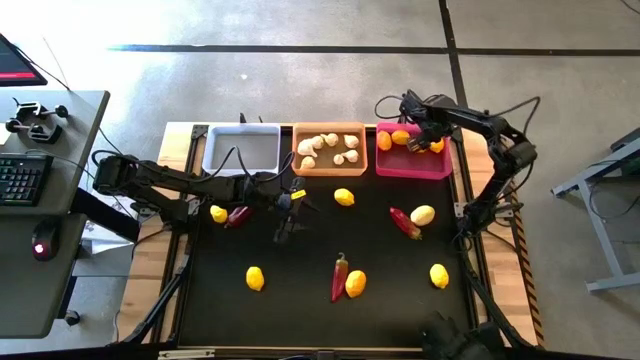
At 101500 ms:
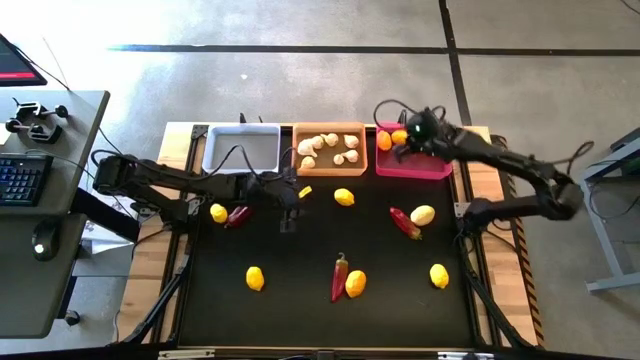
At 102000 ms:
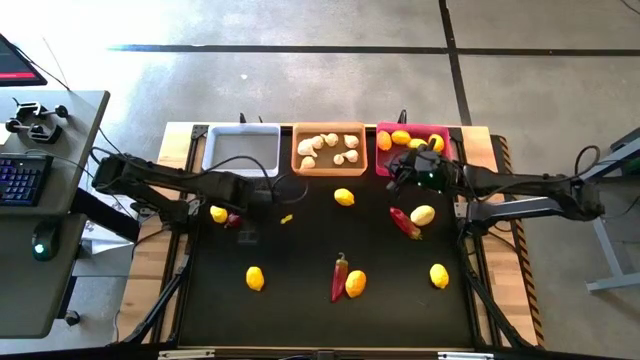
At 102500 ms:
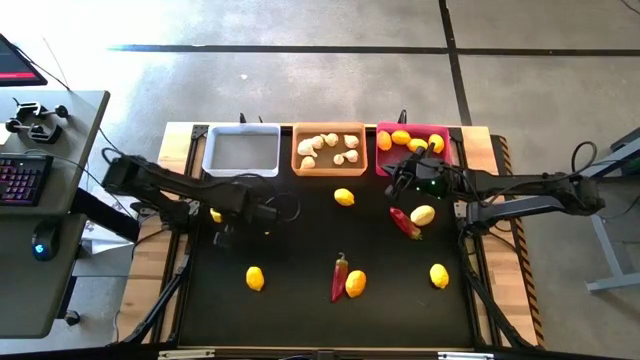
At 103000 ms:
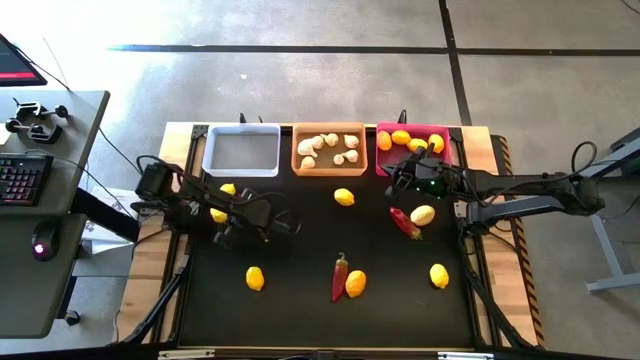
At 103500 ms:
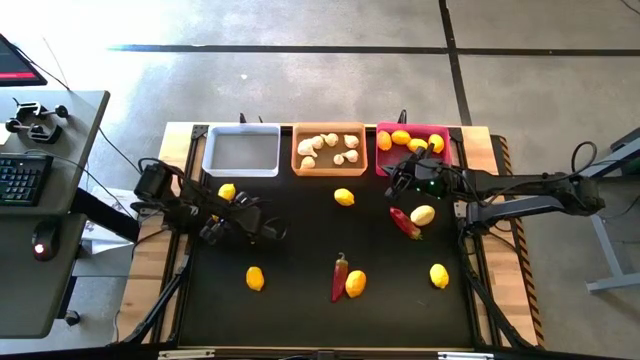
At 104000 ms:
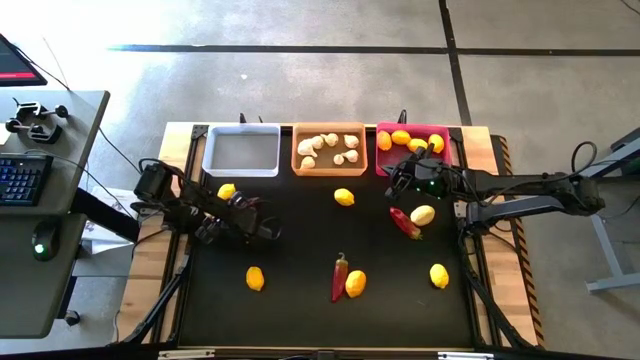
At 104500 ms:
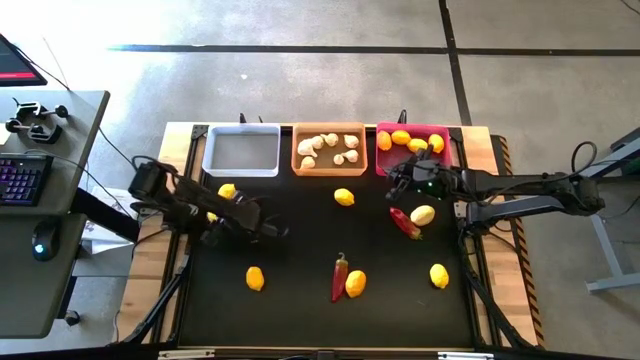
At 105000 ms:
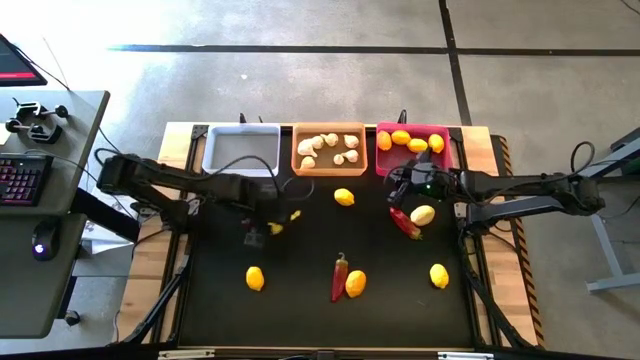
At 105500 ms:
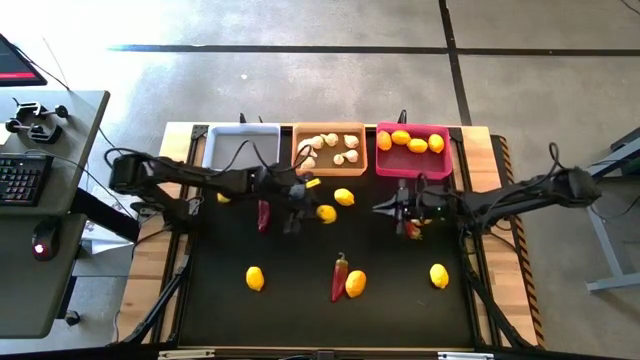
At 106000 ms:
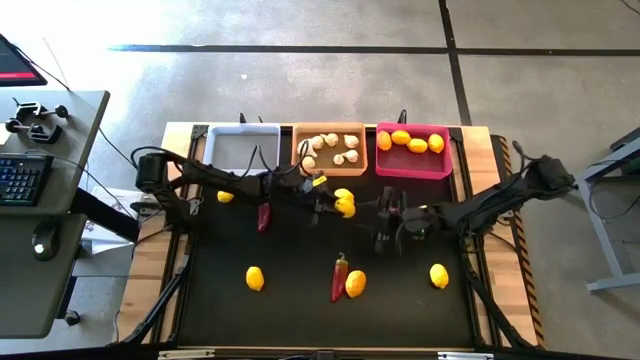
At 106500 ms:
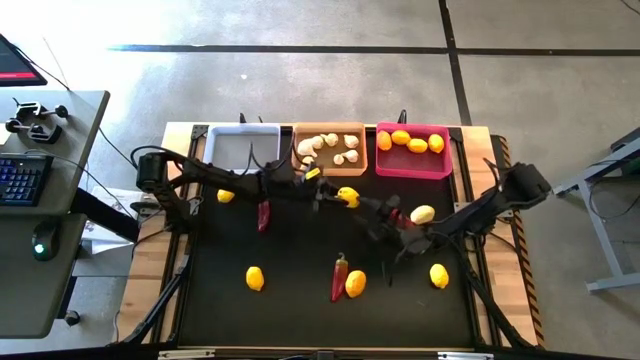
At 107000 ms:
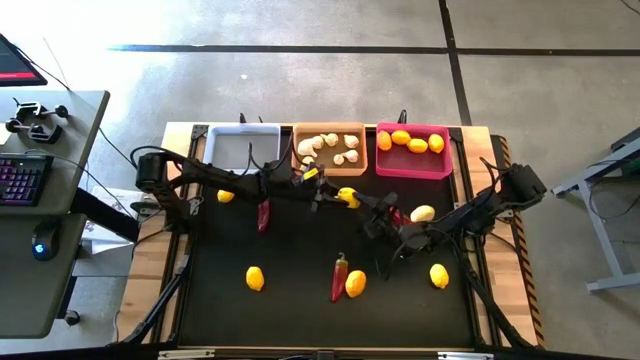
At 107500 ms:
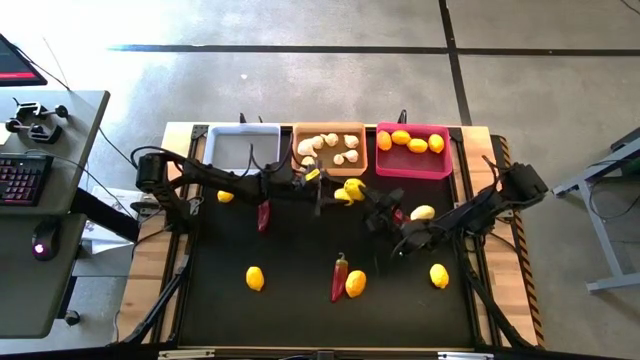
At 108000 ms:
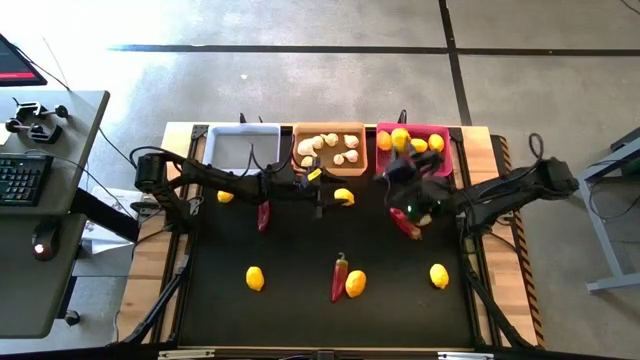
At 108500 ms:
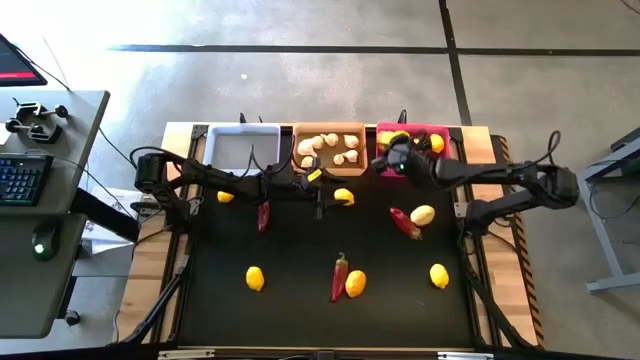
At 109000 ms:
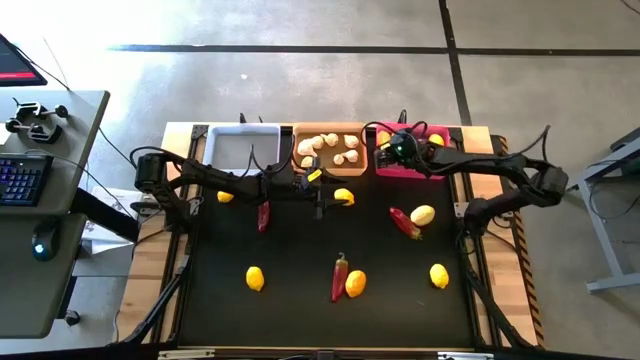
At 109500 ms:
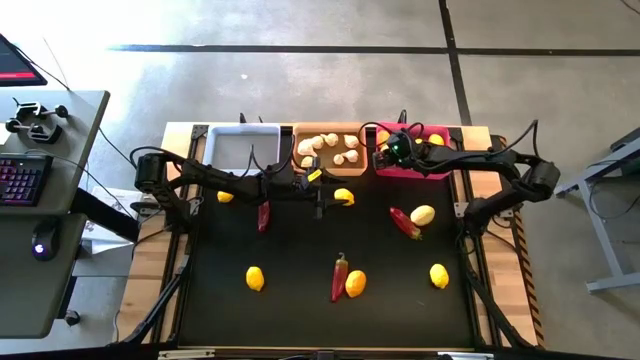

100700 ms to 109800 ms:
Task: Sort produce into baskets
Put the orange lemon into the pink bin

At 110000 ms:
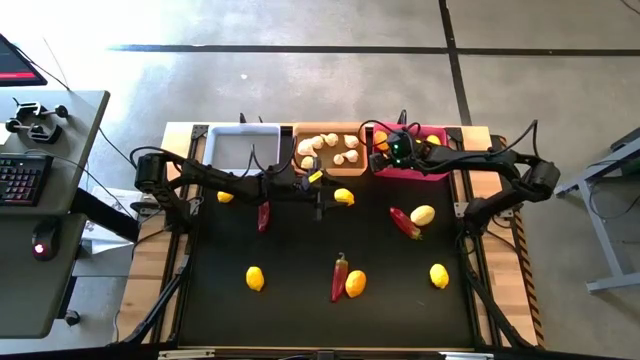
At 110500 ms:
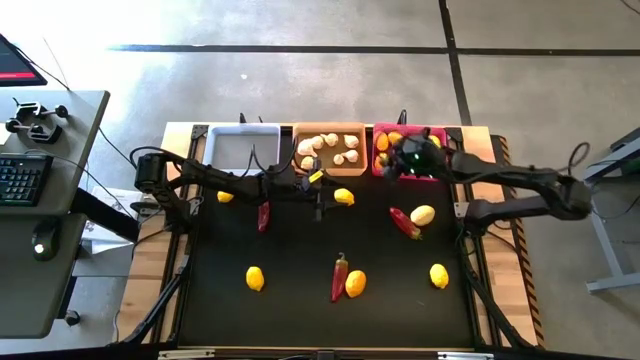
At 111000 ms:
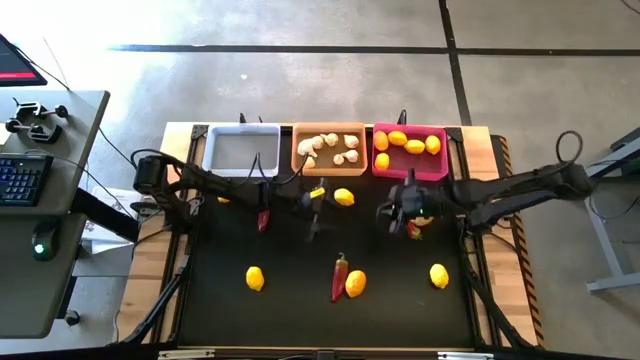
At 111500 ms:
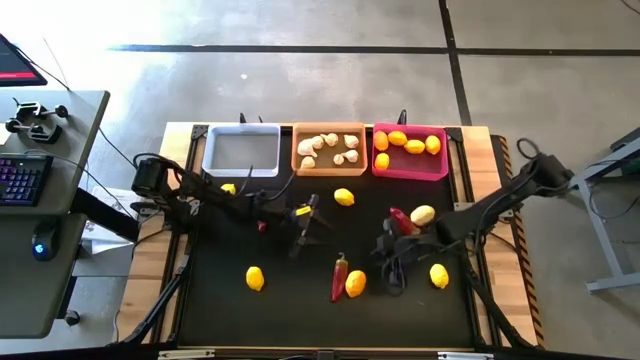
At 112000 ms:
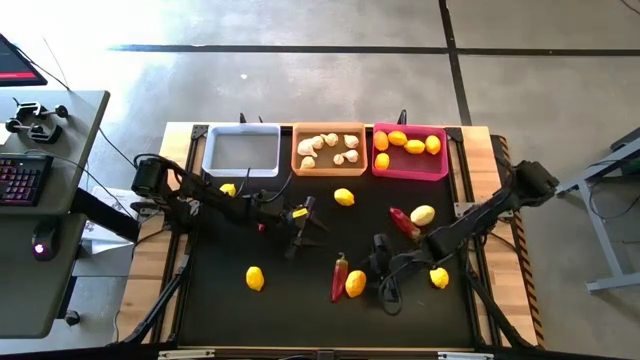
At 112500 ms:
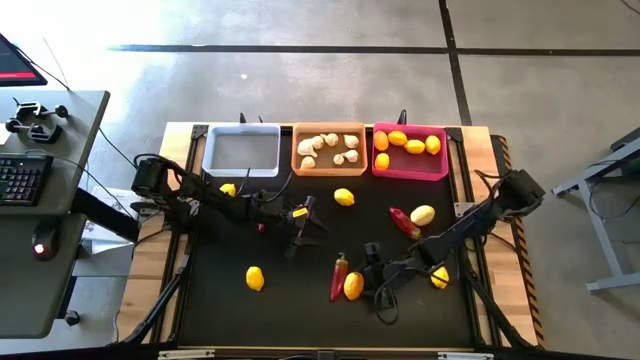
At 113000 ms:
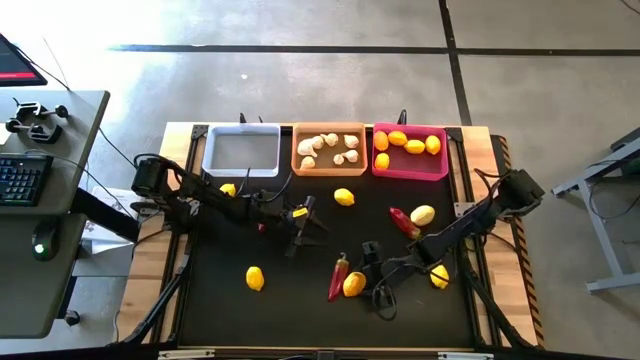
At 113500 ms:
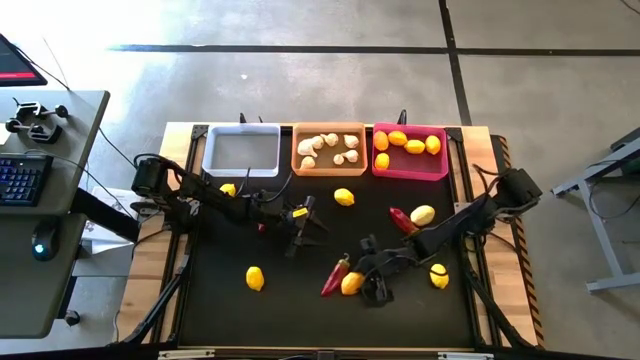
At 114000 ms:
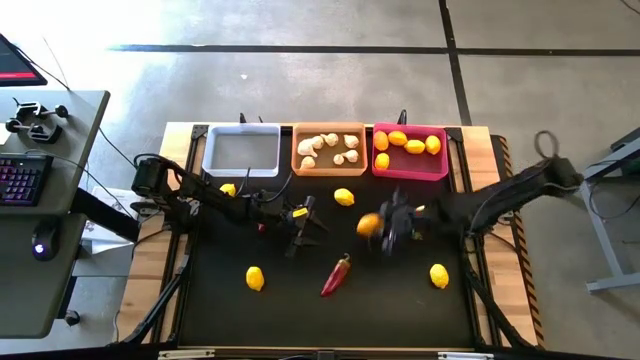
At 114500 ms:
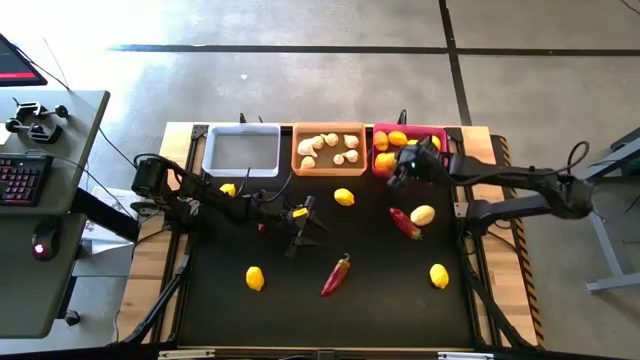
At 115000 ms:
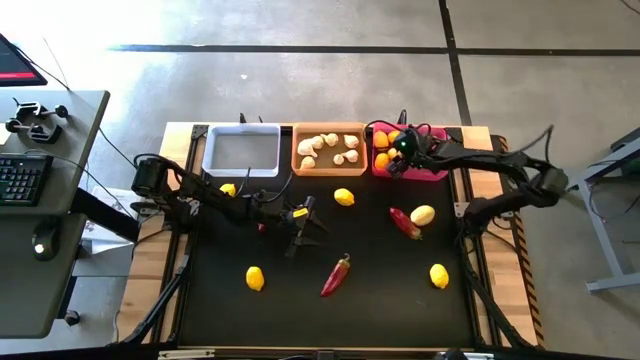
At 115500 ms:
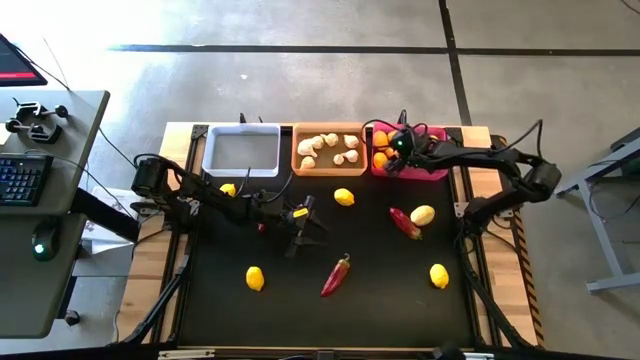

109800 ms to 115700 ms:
Put the yellow lemon into the pink bin

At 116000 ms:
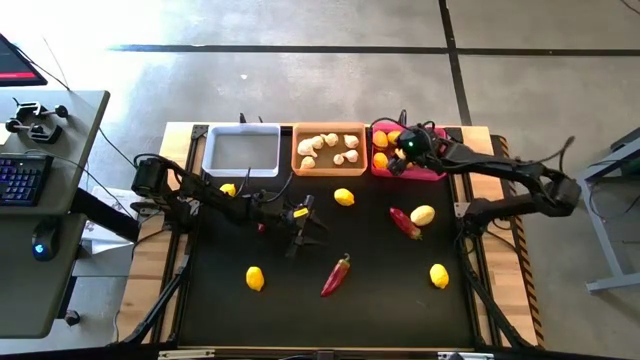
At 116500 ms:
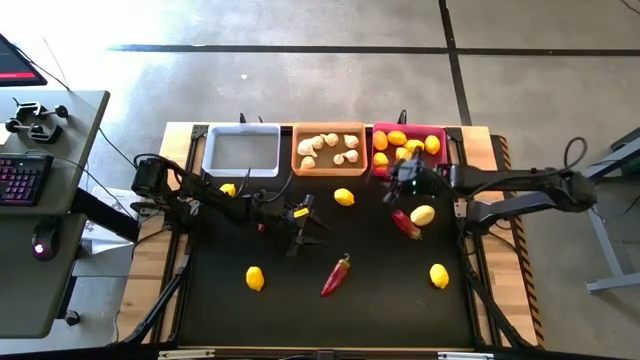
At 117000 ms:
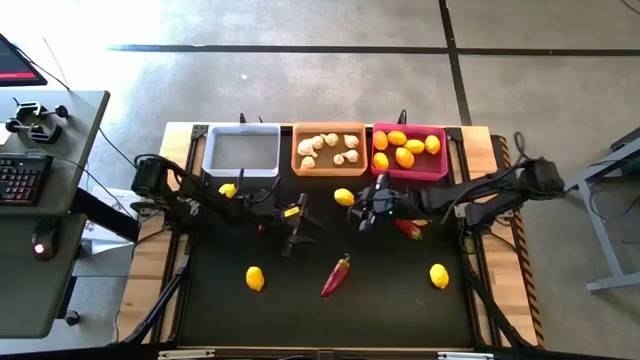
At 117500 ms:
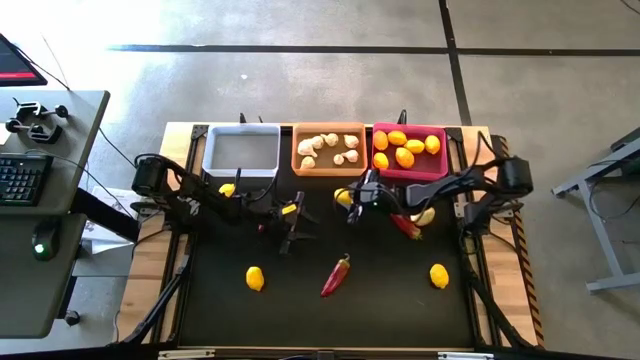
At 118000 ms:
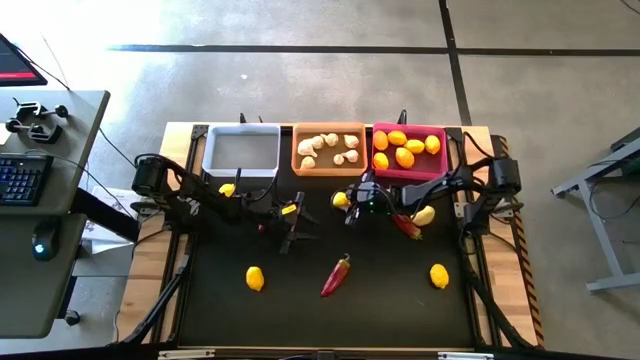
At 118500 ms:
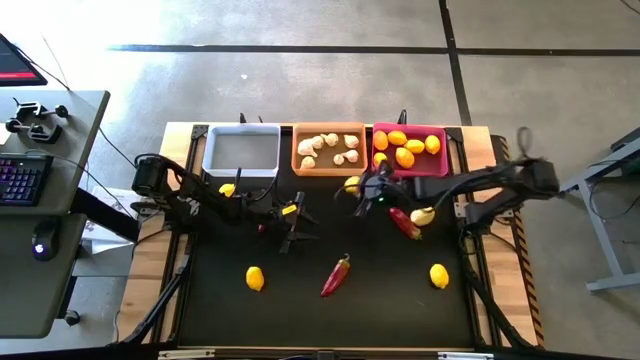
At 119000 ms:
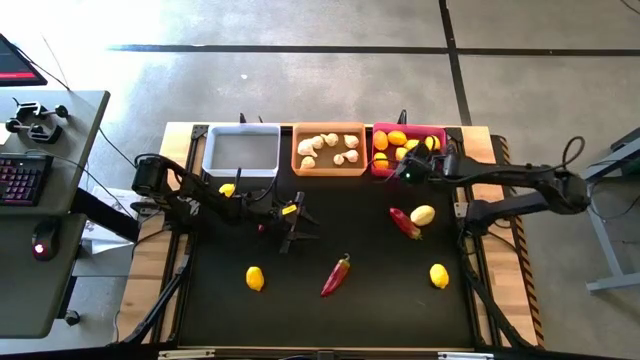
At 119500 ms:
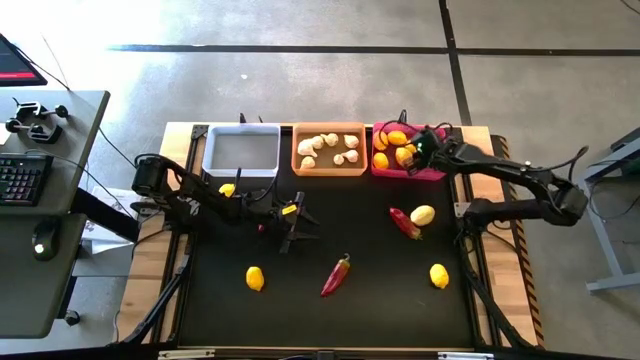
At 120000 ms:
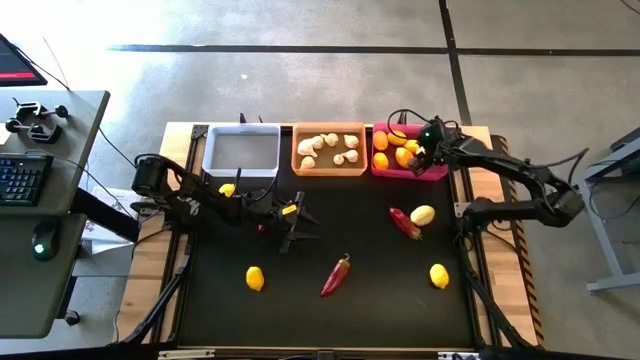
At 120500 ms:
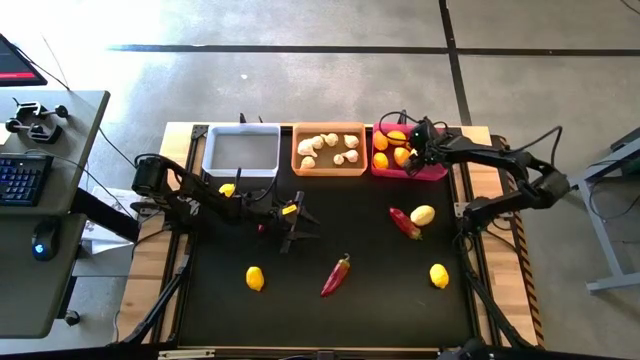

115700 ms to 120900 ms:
Put the yellow lemon into the pink bin
